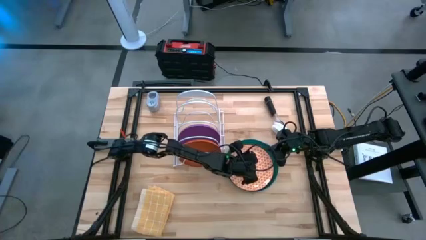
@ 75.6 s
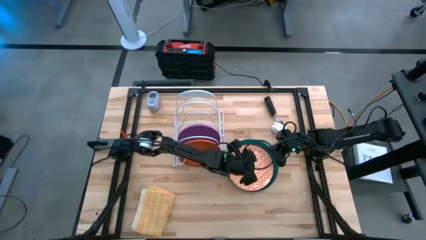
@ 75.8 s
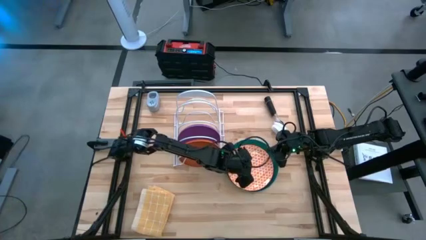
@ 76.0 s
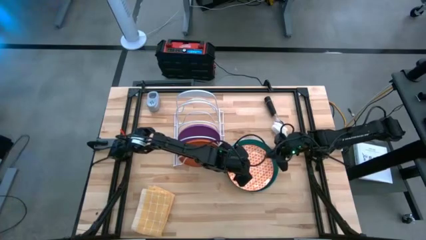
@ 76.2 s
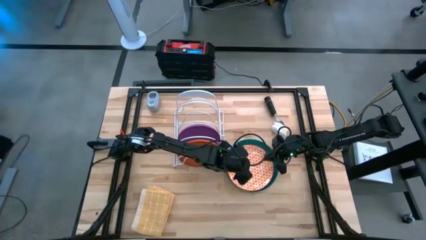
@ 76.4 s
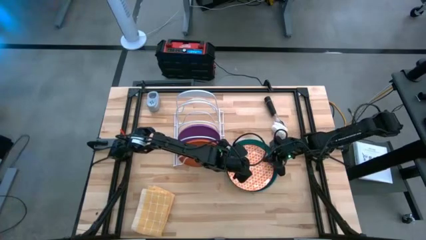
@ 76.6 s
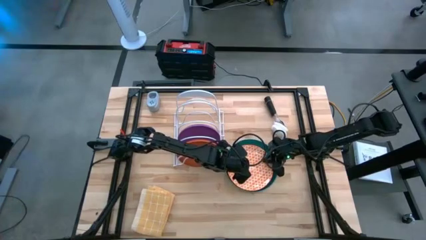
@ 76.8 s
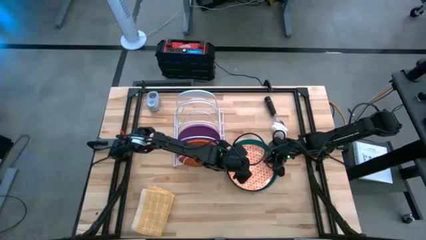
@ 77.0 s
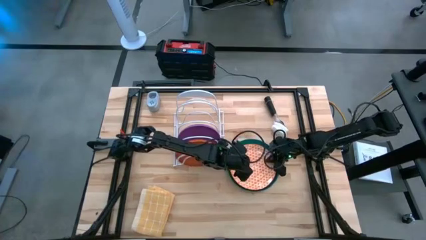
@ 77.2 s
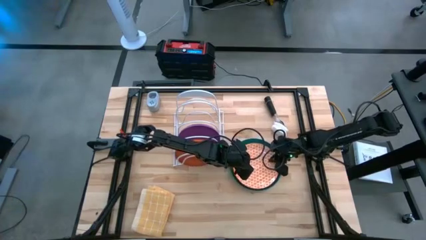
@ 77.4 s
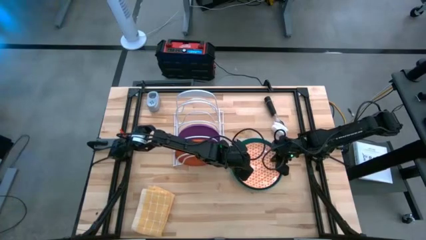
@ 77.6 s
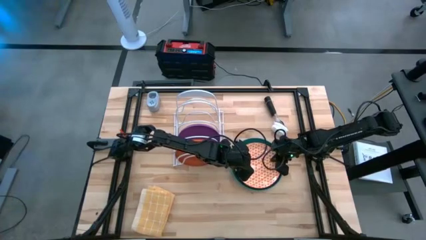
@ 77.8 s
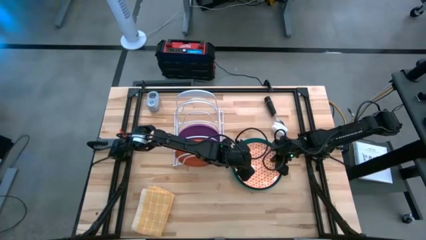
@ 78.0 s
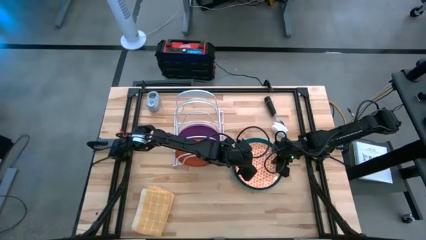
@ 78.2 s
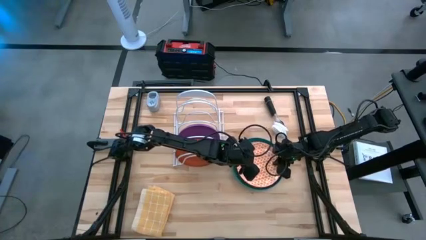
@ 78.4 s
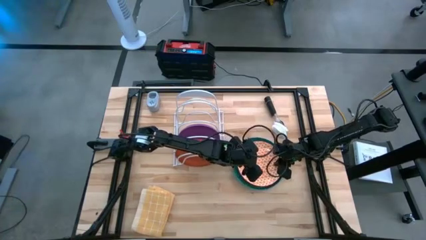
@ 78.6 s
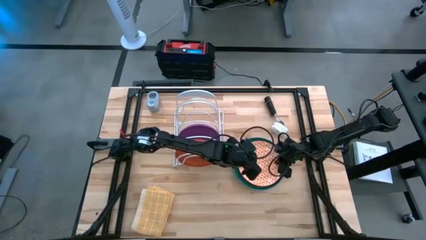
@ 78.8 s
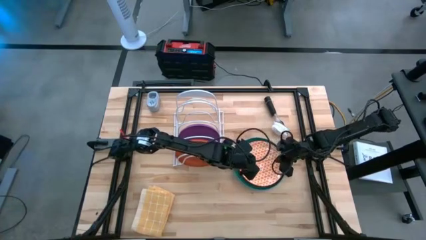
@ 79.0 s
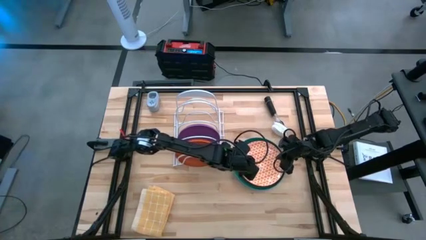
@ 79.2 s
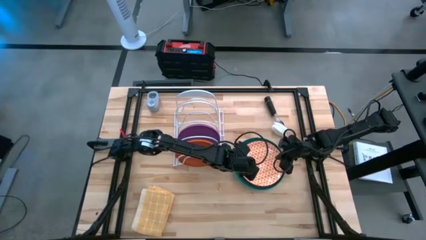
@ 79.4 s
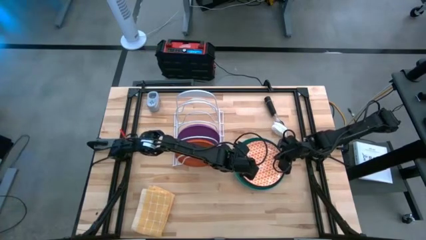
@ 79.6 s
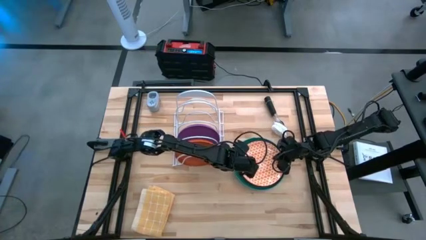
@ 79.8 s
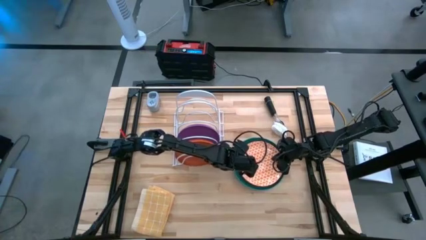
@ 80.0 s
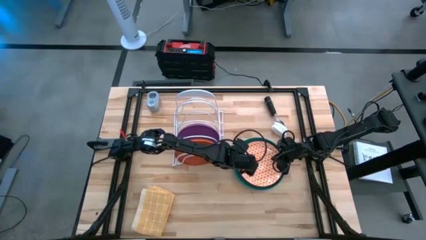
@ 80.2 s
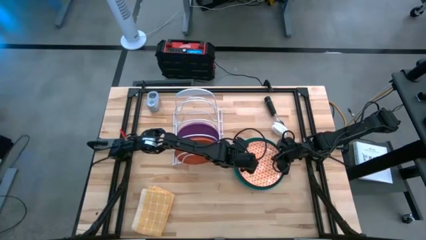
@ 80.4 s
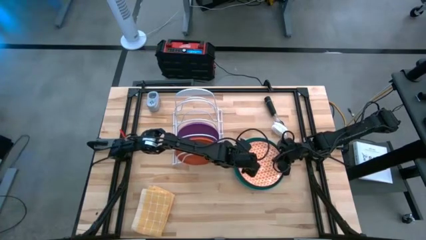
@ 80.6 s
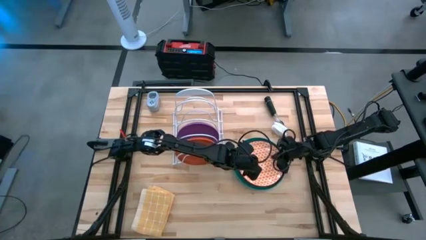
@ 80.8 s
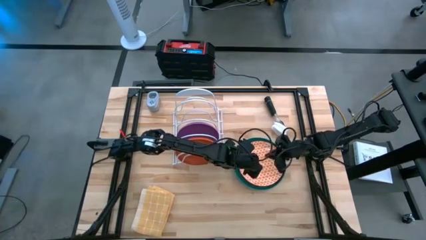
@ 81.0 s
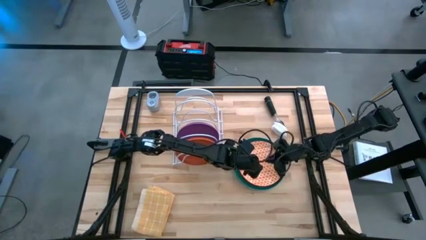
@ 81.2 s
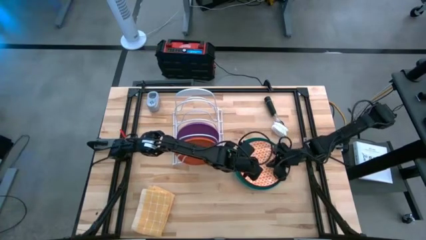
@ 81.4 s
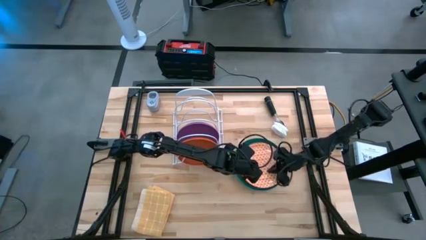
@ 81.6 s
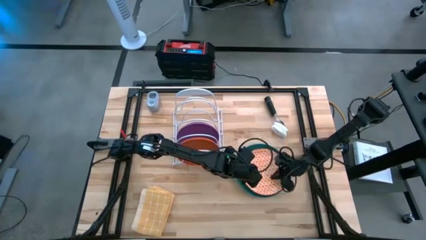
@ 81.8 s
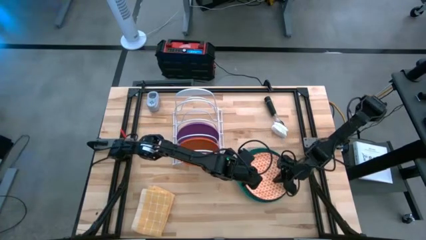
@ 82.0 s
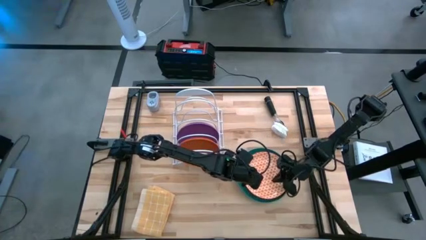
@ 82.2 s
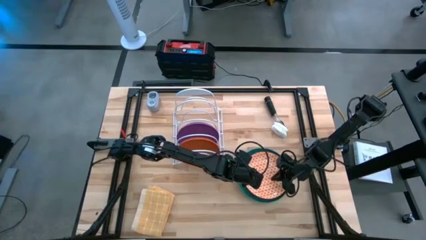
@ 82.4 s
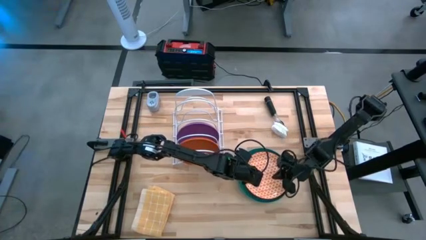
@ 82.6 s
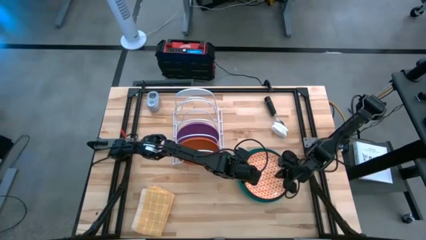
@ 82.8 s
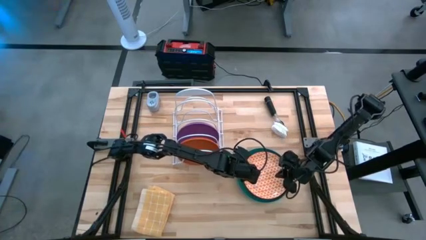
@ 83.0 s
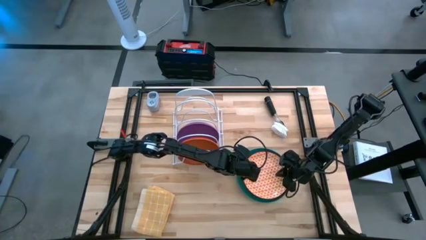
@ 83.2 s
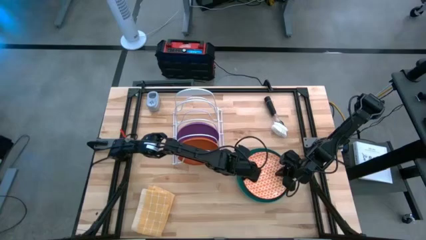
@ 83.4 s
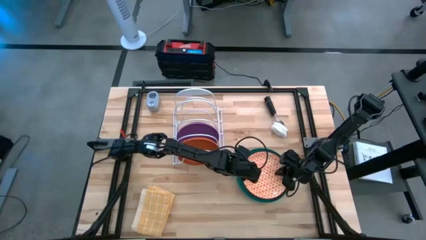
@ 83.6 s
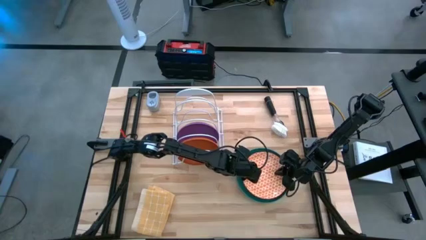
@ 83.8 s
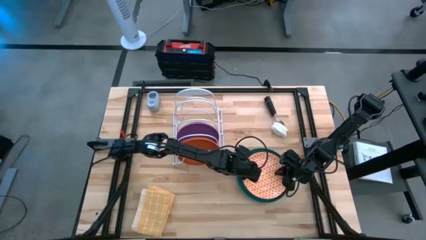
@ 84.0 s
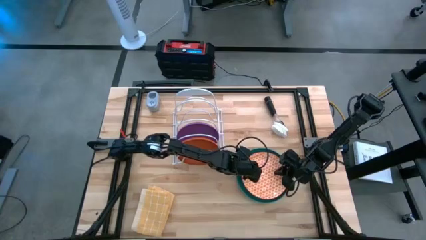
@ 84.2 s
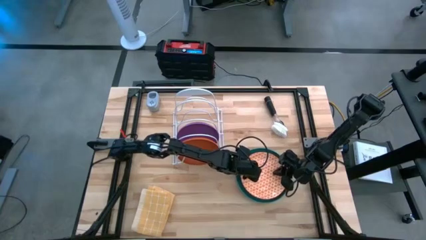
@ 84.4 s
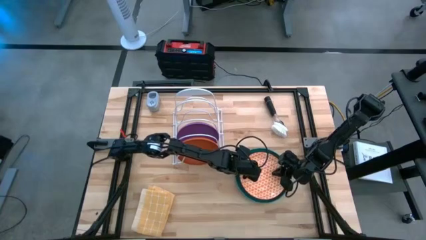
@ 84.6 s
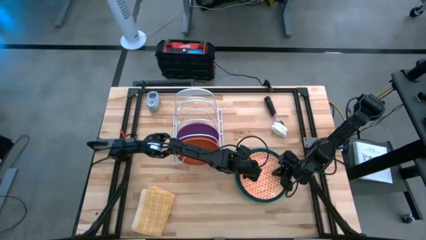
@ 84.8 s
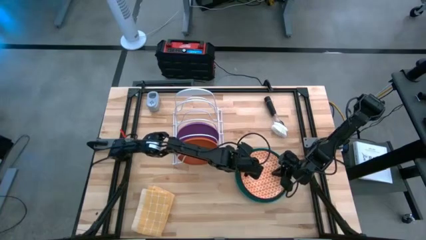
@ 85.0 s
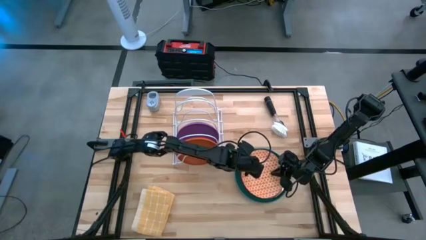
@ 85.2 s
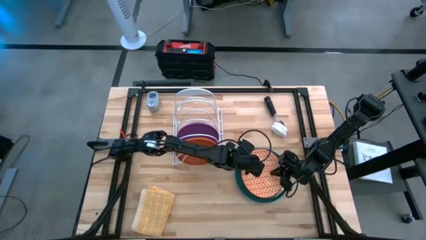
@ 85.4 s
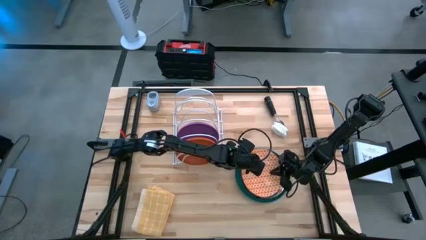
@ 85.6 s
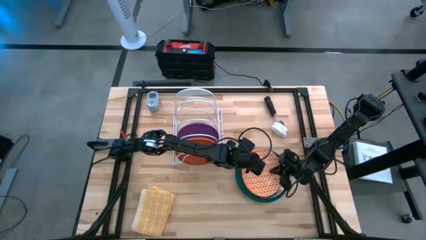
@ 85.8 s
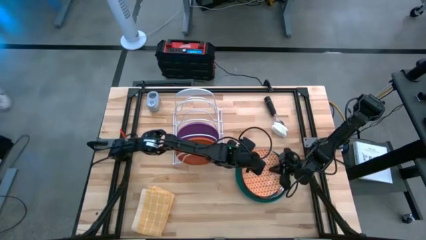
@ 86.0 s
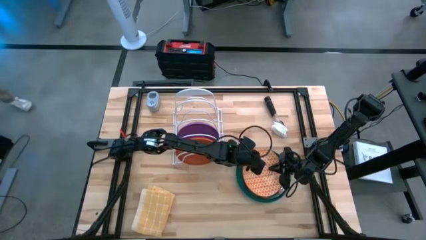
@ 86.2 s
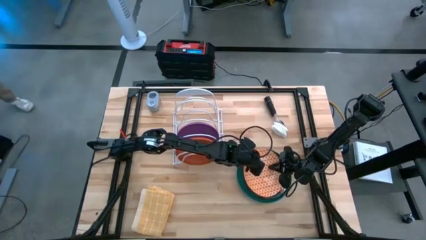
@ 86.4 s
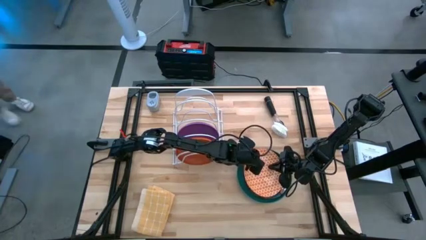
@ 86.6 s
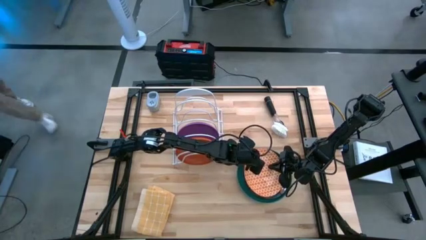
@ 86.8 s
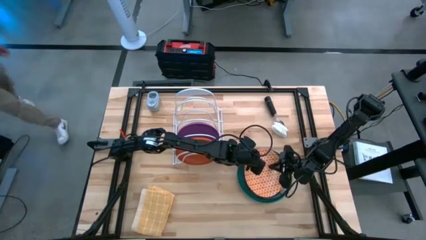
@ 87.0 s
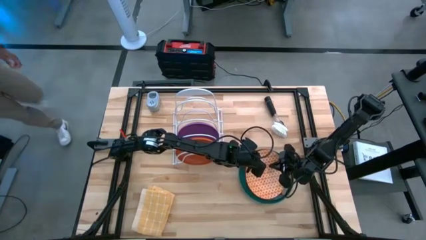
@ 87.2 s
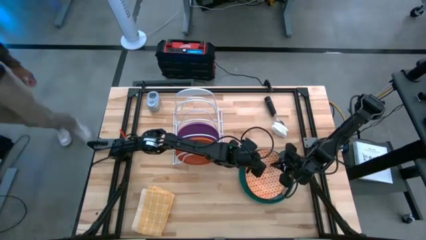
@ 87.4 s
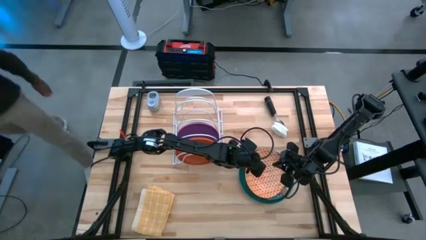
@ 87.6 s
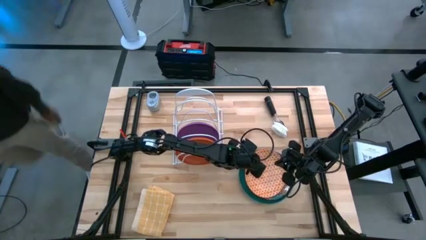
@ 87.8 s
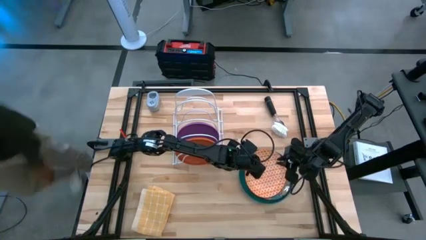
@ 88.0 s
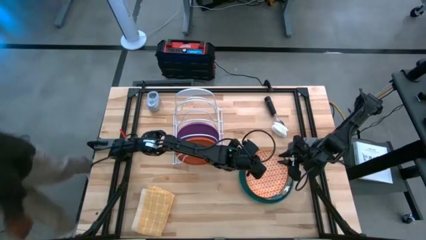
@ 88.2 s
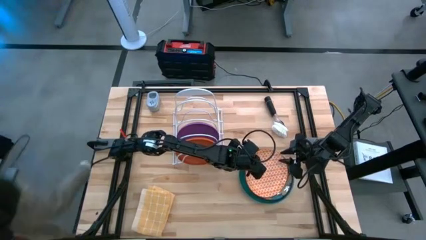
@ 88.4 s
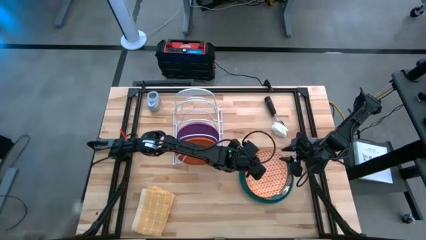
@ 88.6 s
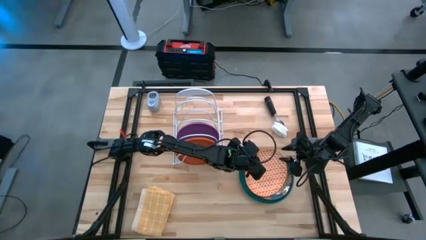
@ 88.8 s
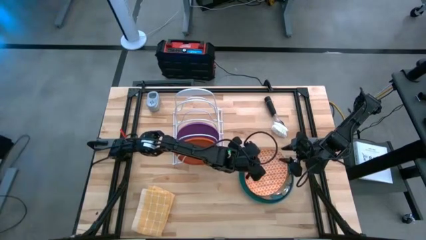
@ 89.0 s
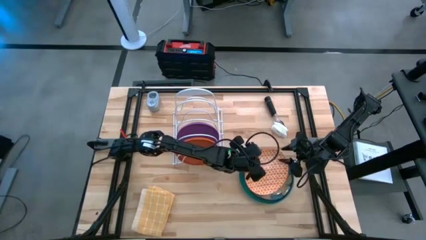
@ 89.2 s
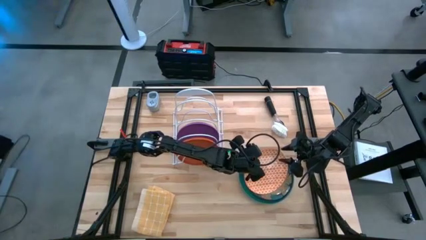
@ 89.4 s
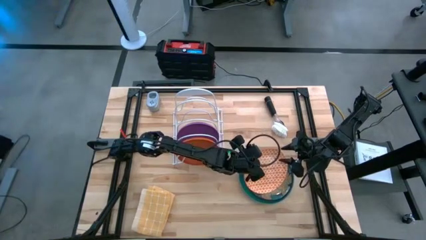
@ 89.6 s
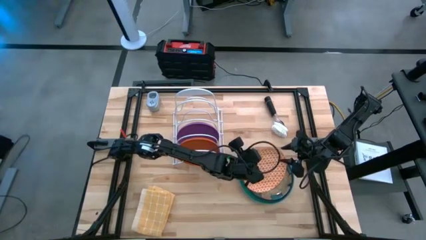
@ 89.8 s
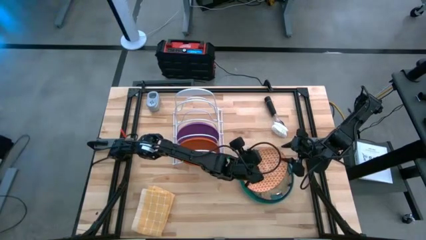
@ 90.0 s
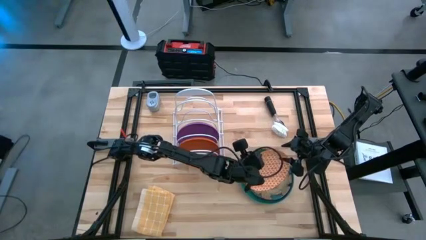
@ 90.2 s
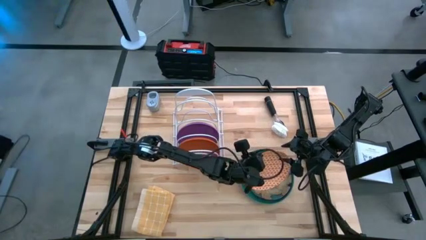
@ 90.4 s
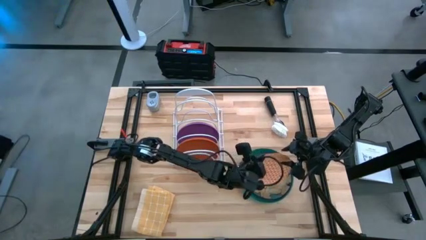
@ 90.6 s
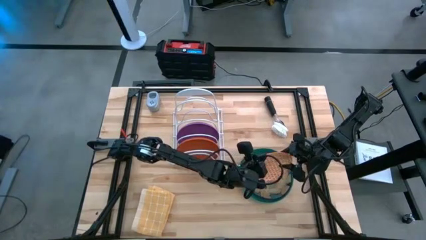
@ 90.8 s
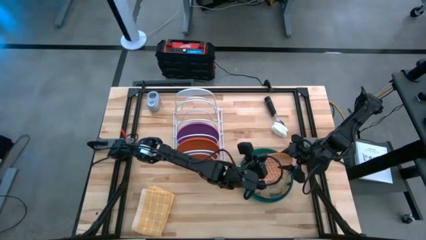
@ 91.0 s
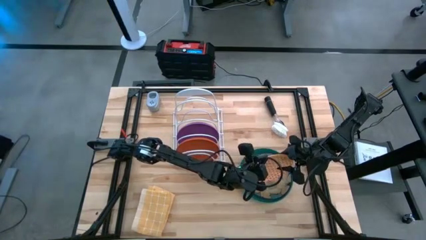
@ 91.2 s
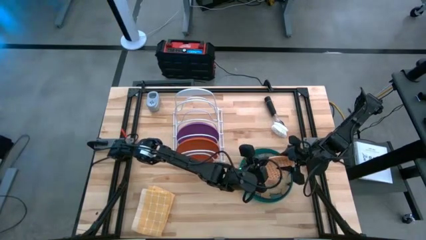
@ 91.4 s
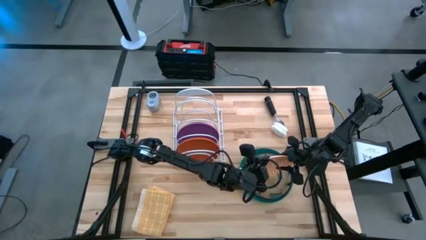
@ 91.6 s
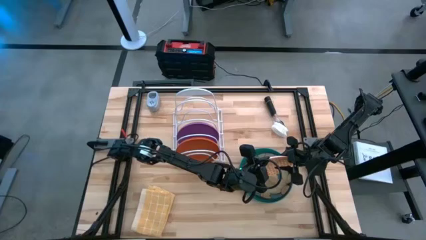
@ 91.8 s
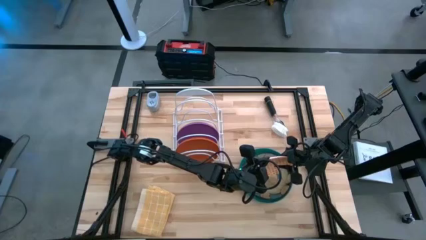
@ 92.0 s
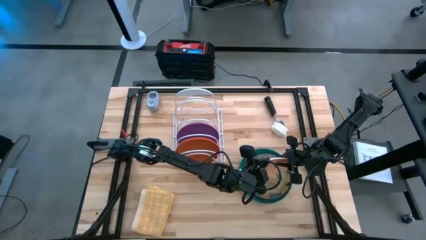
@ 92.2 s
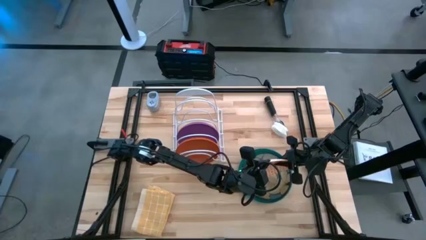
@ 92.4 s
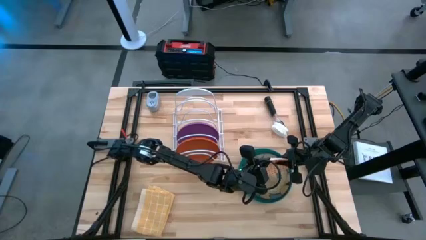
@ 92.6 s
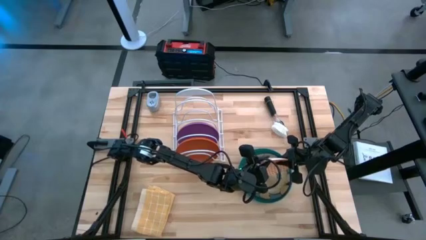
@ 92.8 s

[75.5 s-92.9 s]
Task: Sort dishes
Put the orange/white plate into the dish rack
